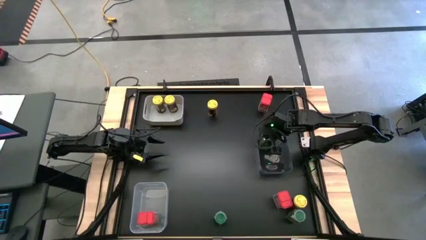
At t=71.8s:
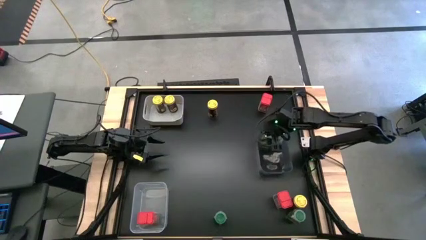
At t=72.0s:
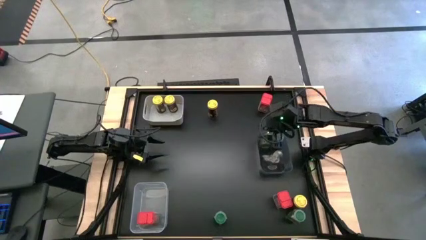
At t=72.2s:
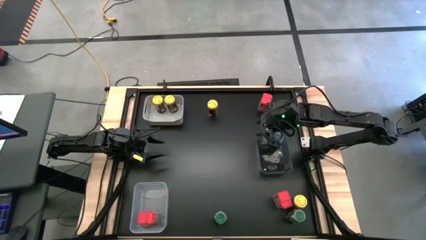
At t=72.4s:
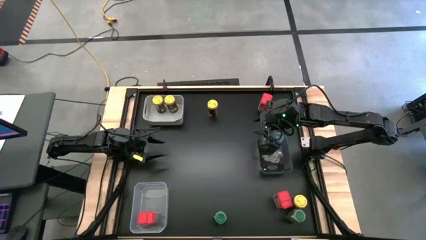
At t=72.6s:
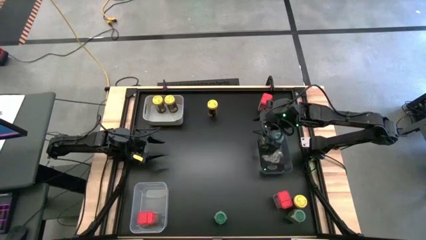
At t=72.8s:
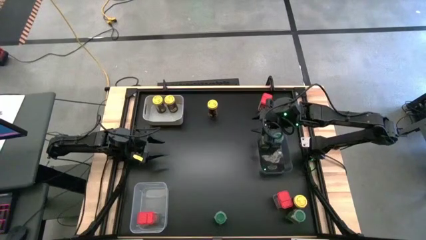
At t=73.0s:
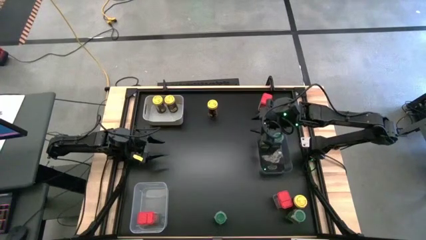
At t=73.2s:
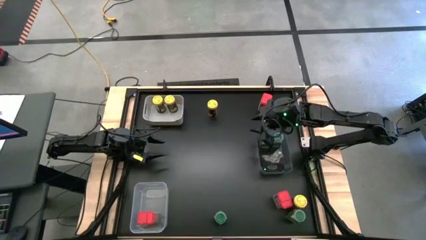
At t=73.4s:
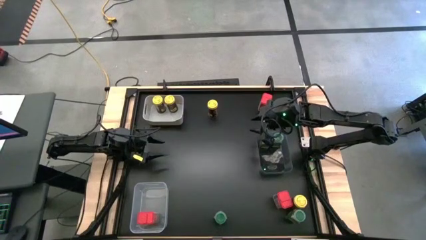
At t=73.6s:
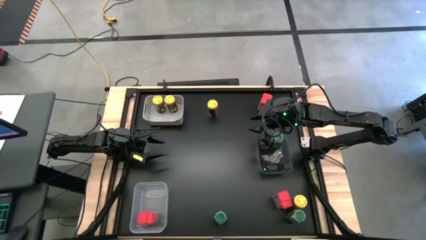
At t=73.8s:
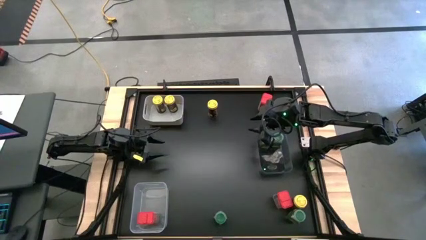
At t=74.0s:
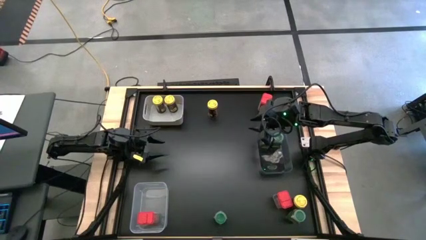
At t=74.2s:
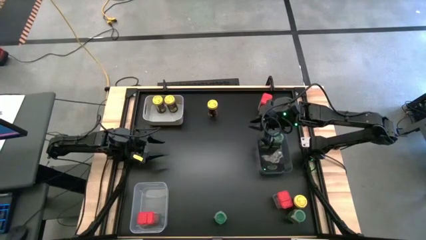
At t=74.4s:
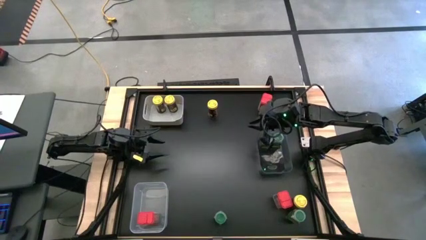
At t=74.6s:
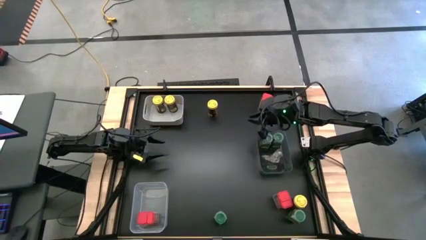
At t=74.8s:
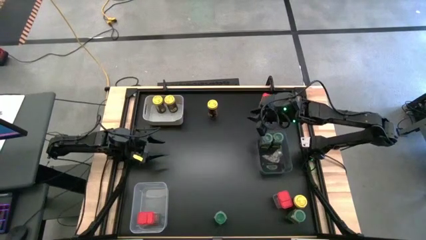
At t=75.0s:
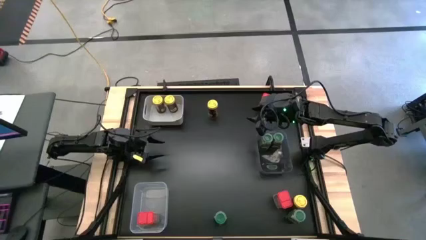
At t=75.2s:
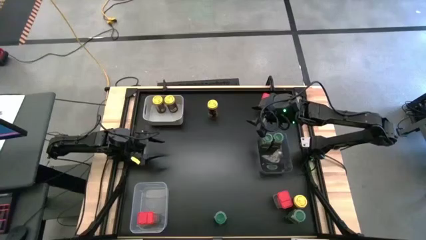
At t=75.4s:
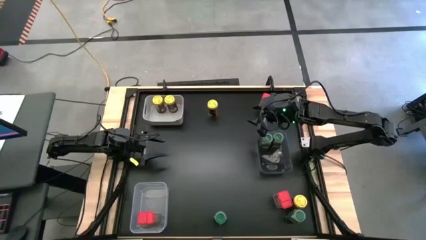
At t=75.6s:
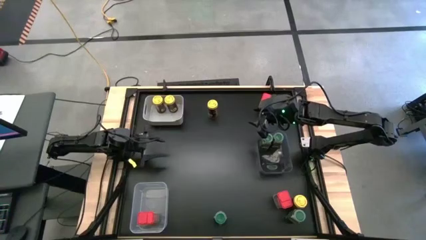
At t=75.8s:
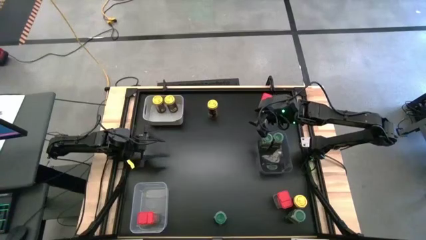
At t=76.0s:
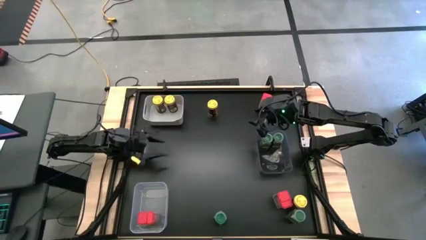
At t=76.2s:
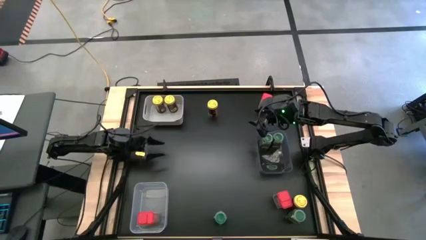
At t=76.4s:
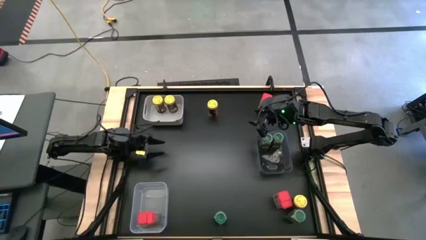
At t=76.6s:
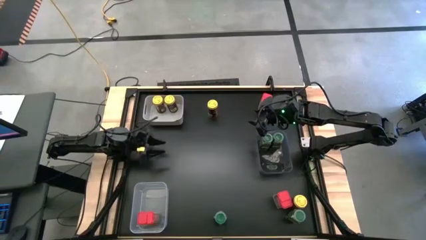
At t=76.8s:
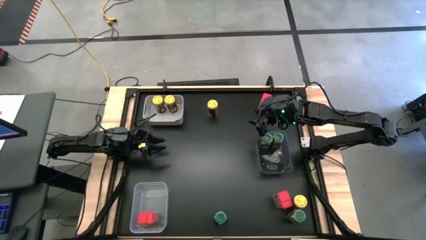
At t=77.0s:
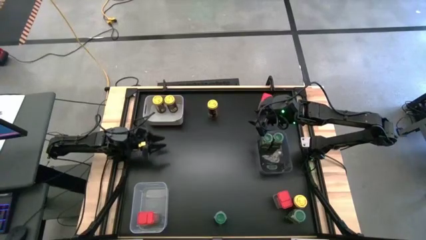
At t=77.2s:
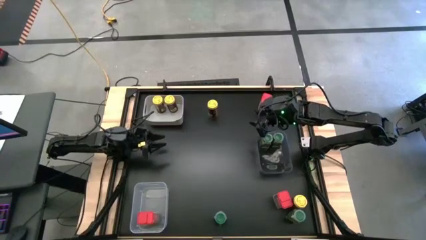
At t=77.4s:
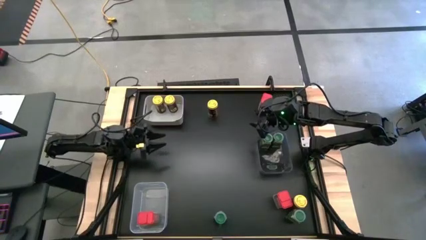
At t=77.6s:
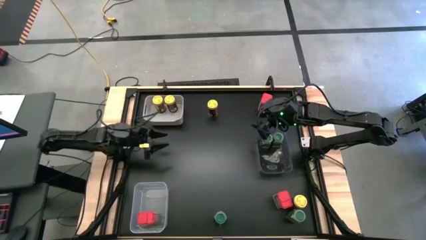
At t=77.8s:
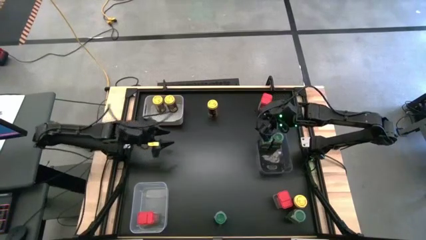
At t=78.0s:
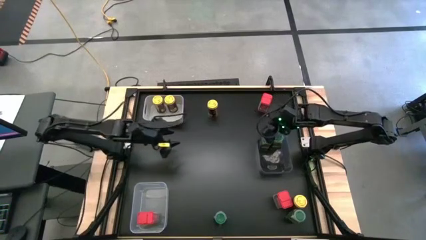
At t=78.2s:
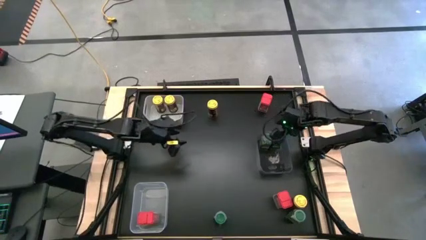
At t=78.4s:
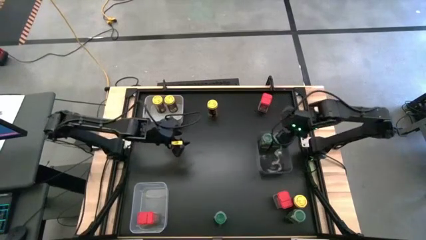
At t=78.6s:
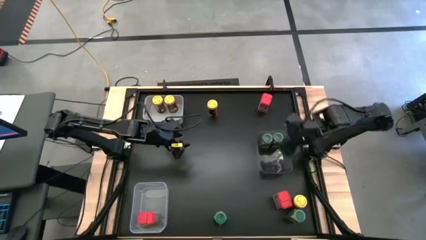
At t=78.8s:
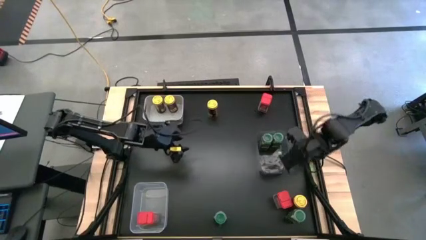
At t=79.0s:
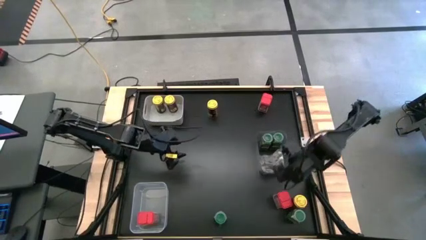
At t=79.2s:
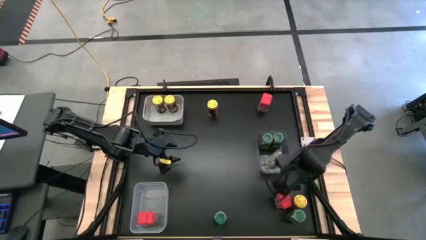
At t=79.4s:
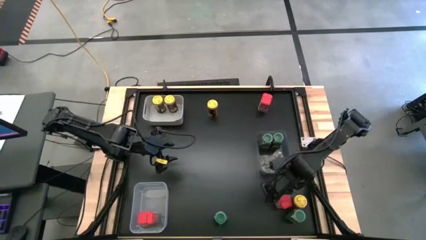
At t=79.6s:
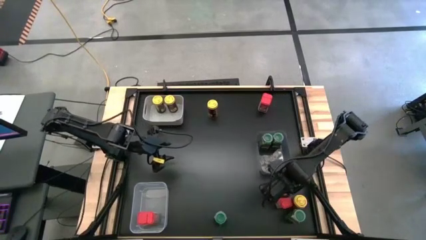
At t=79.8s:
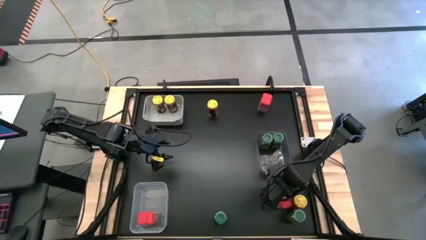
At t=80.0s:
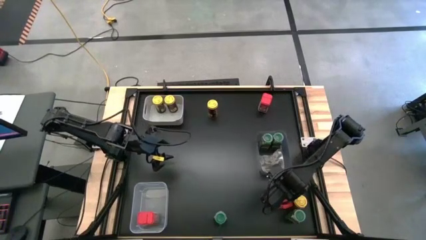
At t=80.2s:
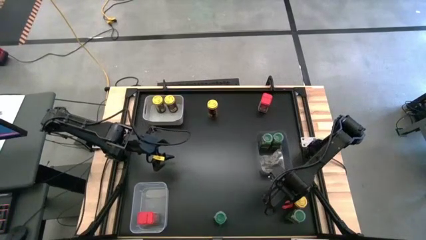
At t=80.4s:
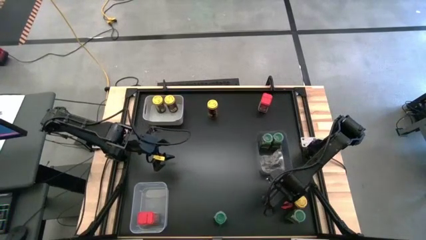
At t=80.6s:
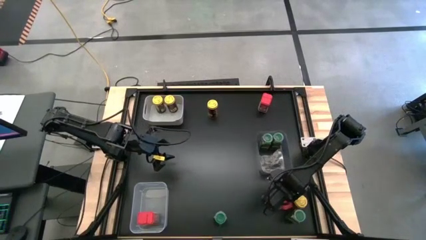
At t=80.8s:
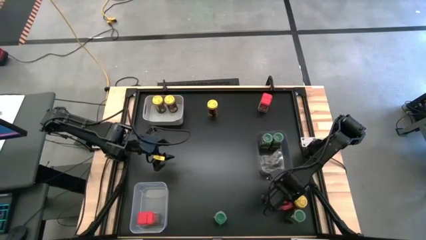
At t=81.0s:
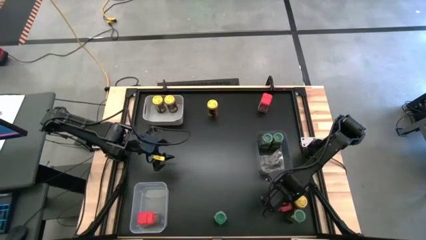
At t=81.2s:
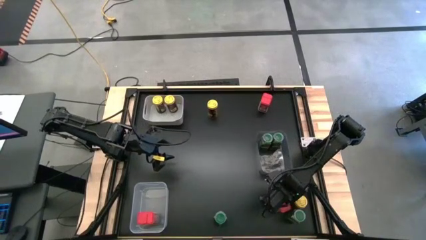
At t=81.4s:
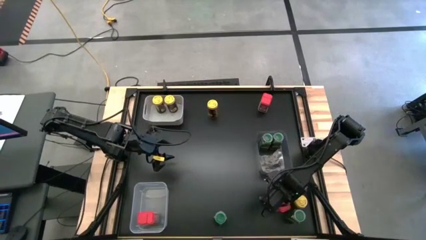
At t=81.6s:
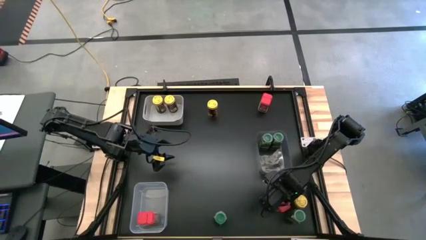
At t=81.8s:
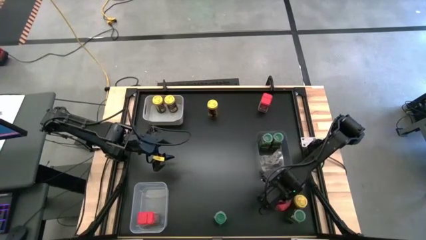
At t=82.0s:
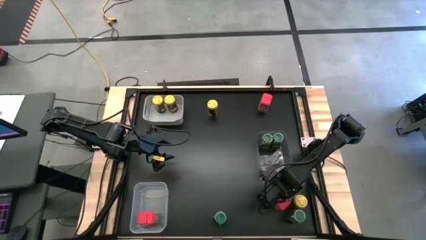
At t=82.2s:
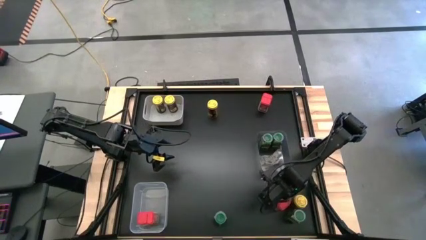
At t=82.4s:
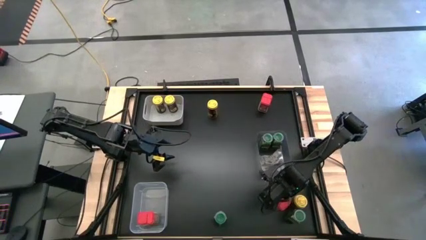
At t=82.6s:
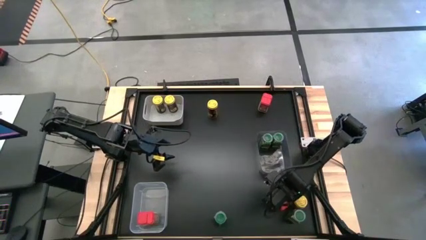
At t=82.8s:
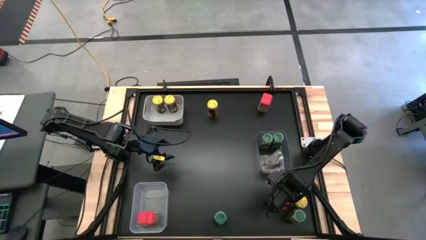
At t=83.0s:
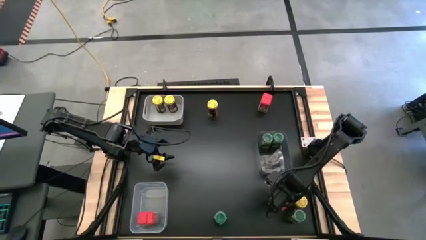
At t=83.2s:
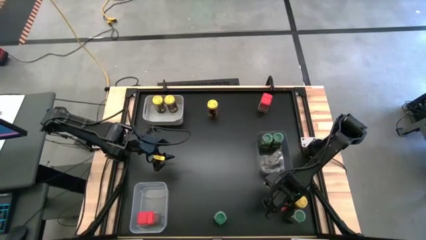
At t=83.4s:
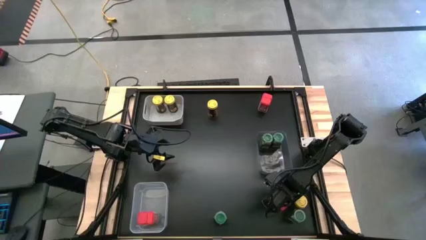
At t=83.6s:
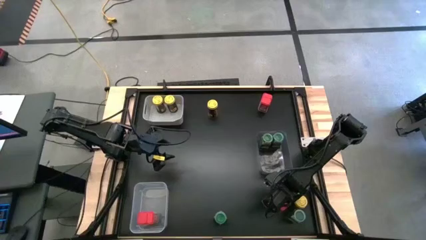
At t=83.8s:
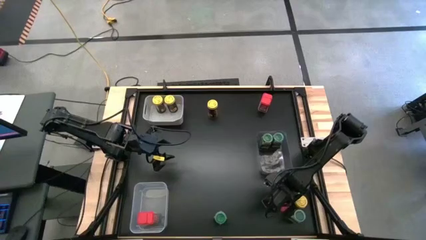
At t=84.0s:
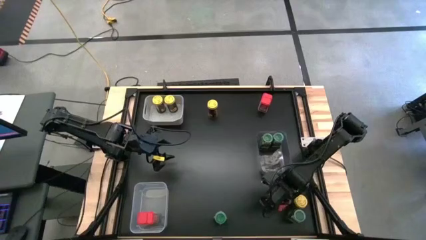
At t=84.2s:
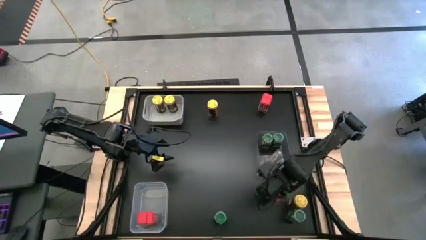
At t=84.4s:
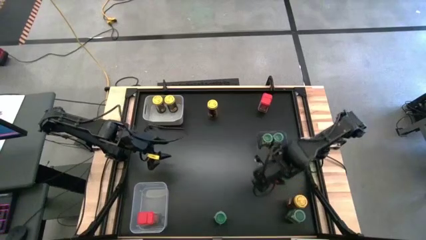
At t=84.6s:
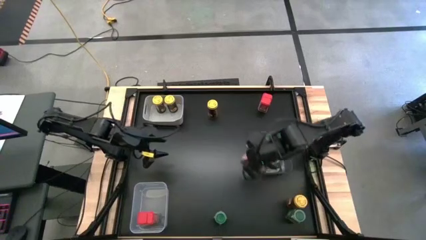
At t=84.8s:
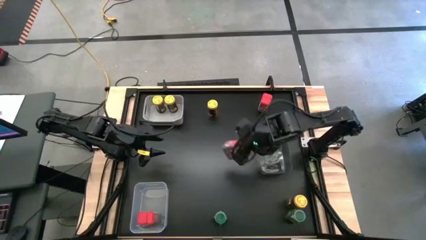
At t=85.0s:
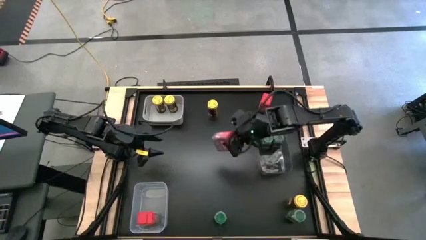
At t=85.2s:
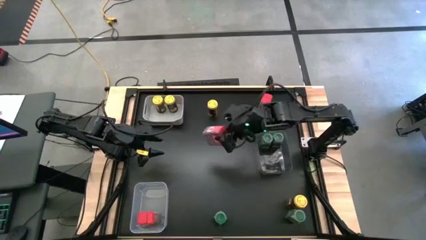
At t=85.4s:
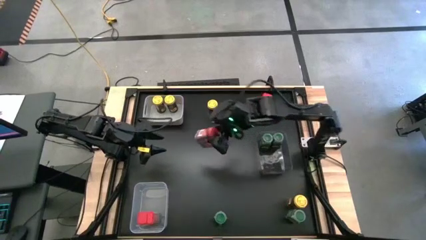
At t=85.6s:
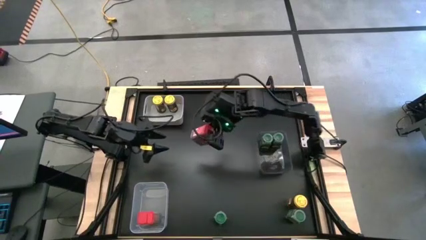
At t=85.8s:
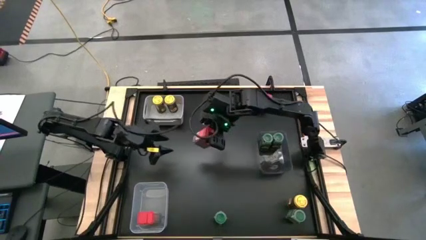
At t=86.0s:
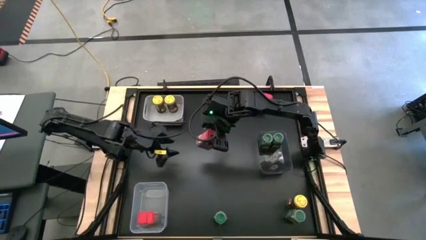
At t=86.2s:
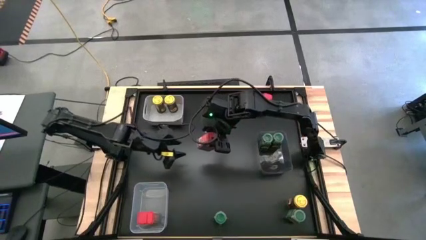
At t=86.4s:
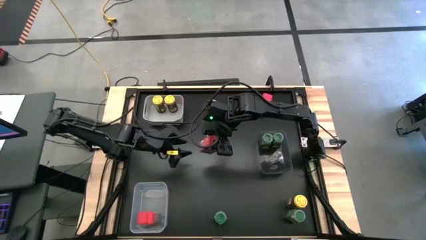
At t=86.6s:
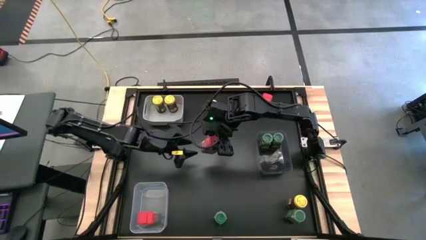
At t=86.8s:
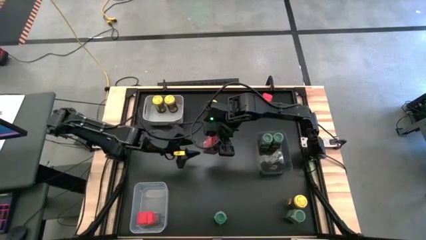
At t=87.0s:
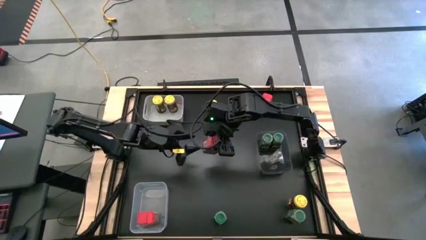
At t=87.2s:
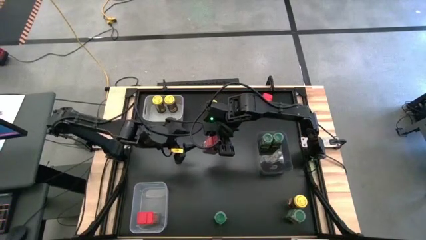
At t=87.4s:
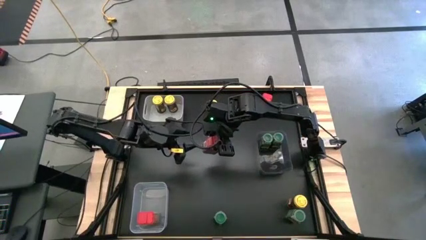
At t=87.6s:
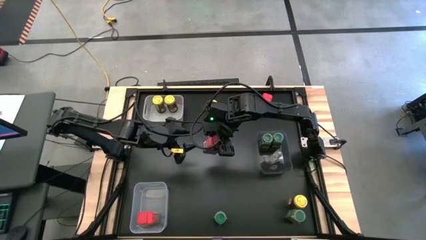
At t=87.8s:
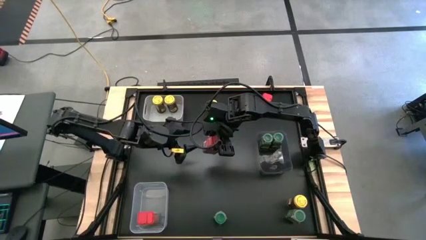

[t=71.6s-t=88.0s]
Task: Sort spices by type
Put the bottom red seasoning can into the transparent bin
